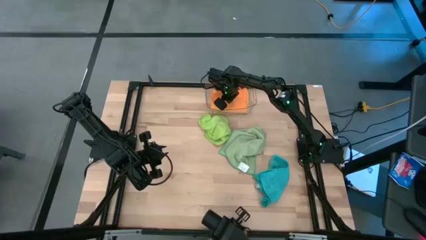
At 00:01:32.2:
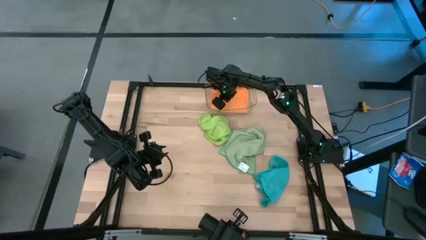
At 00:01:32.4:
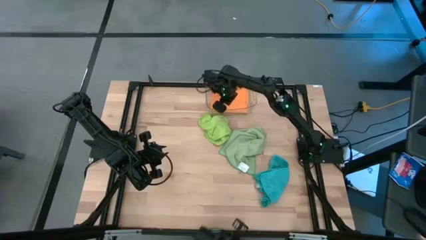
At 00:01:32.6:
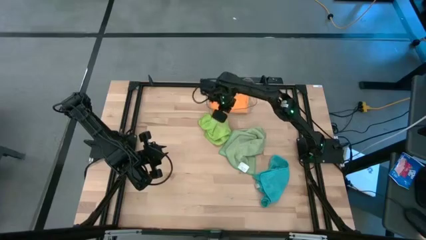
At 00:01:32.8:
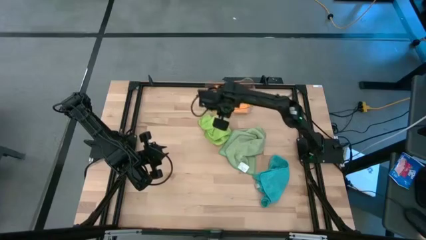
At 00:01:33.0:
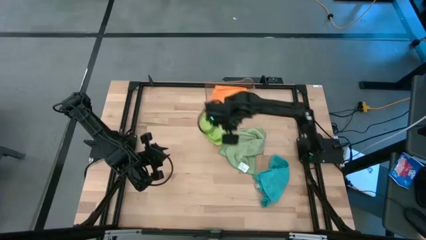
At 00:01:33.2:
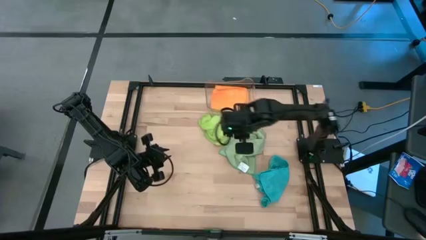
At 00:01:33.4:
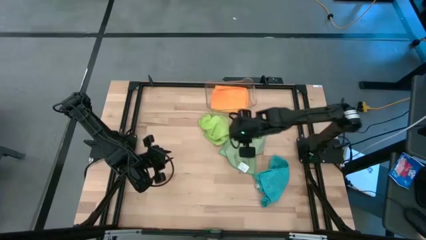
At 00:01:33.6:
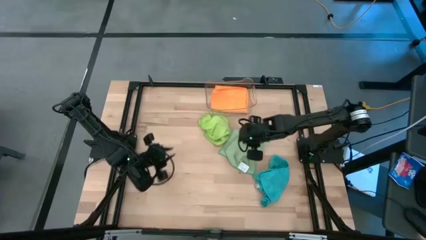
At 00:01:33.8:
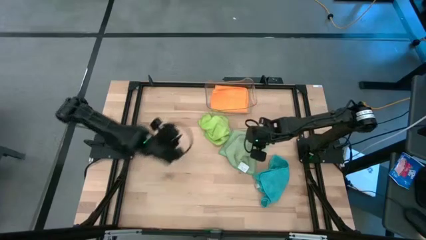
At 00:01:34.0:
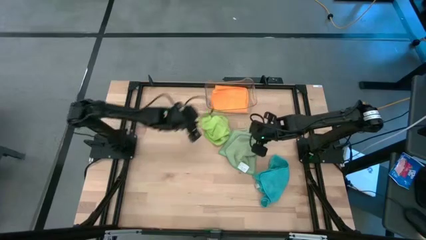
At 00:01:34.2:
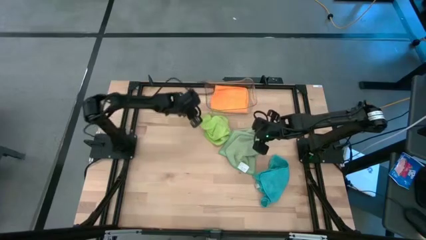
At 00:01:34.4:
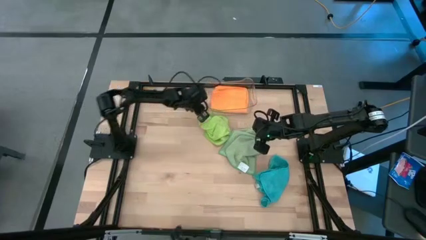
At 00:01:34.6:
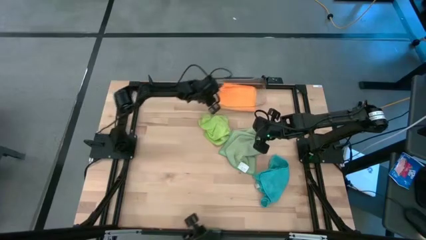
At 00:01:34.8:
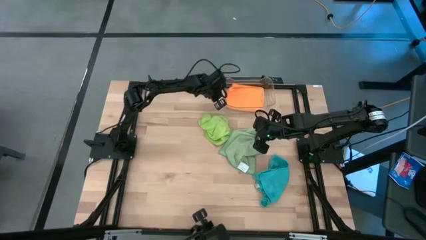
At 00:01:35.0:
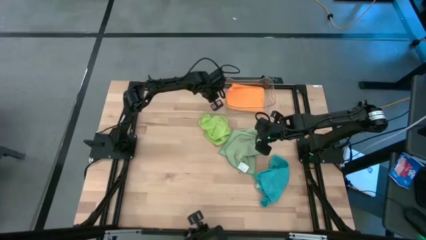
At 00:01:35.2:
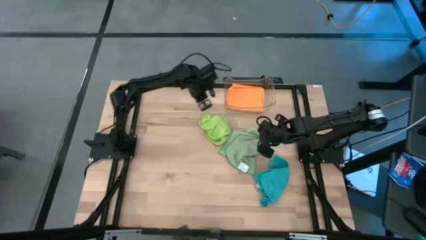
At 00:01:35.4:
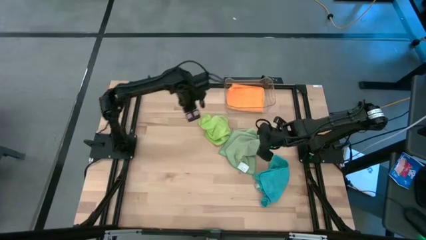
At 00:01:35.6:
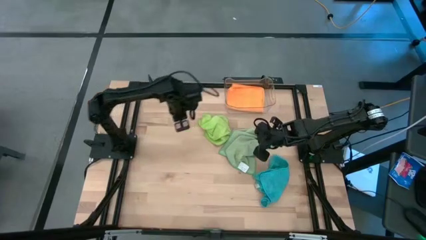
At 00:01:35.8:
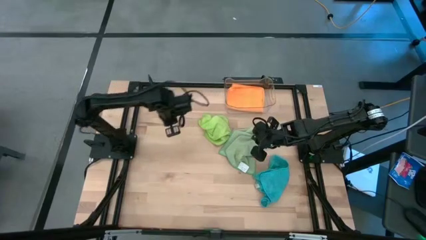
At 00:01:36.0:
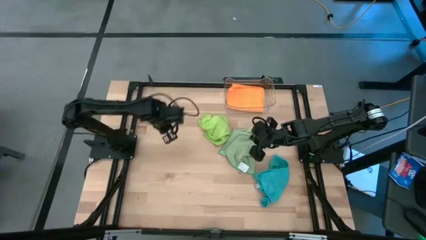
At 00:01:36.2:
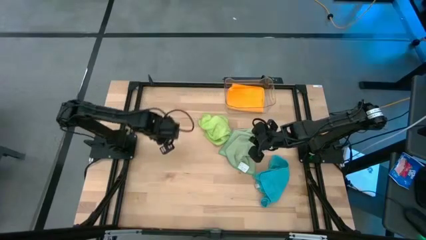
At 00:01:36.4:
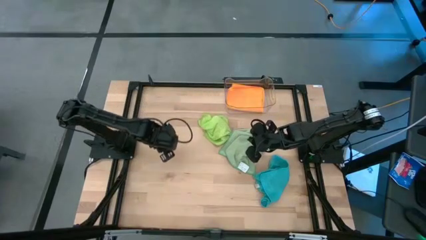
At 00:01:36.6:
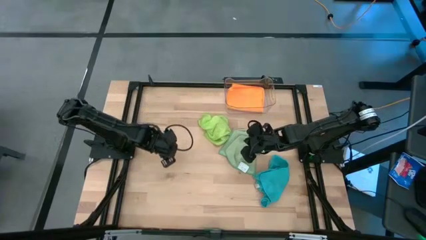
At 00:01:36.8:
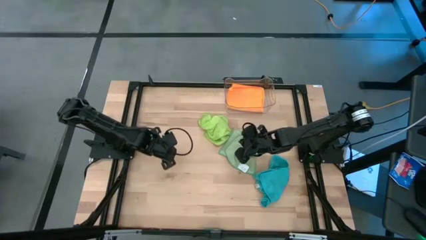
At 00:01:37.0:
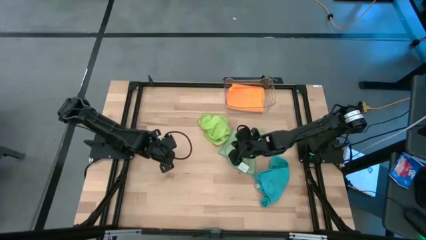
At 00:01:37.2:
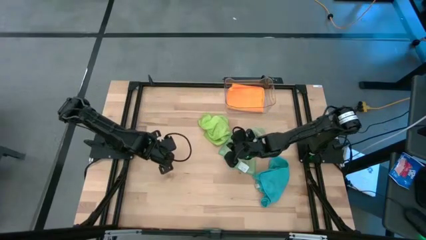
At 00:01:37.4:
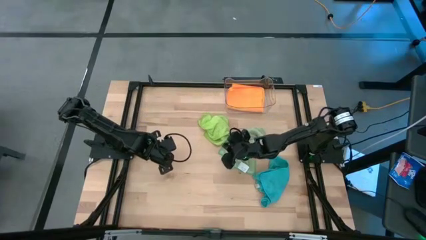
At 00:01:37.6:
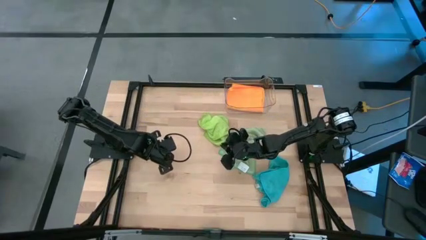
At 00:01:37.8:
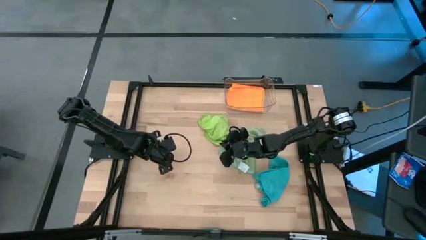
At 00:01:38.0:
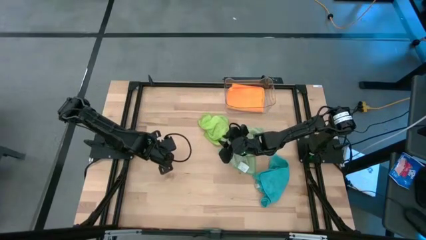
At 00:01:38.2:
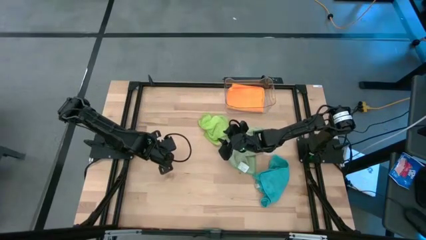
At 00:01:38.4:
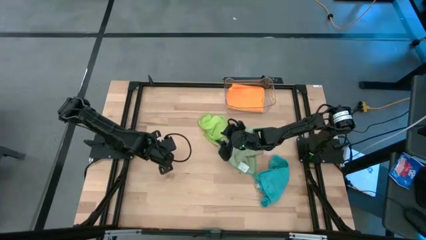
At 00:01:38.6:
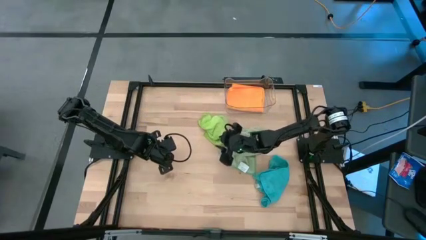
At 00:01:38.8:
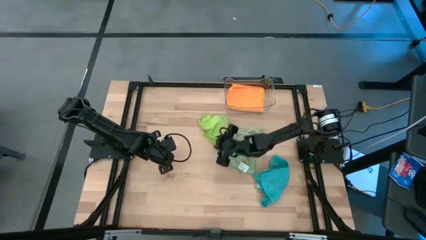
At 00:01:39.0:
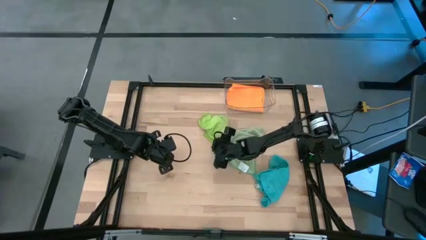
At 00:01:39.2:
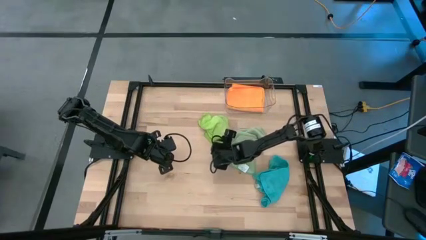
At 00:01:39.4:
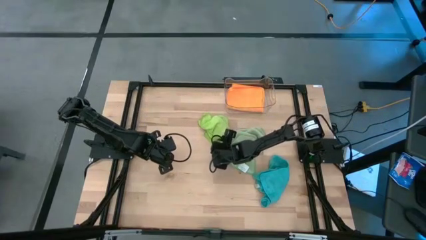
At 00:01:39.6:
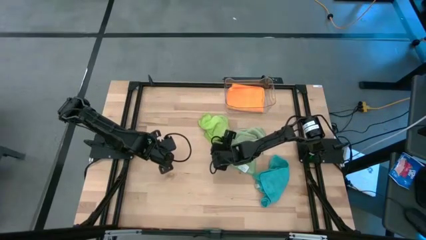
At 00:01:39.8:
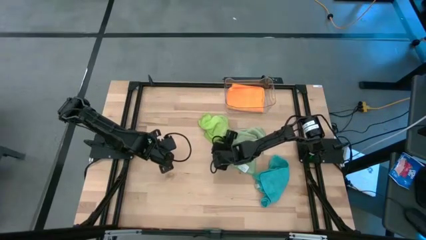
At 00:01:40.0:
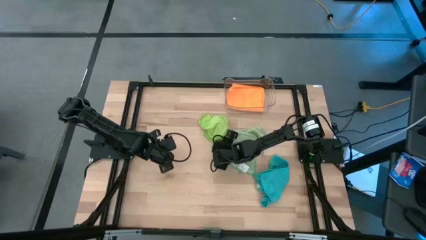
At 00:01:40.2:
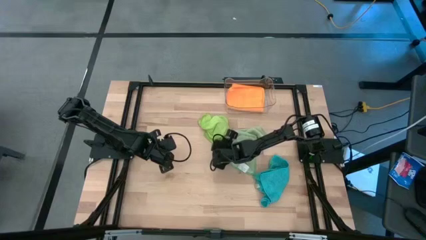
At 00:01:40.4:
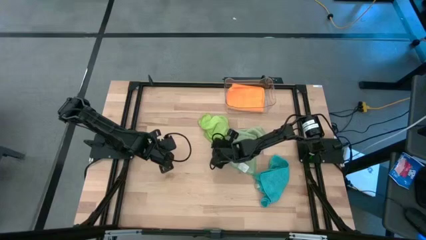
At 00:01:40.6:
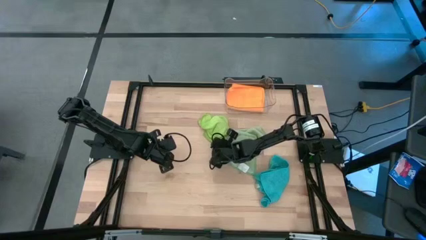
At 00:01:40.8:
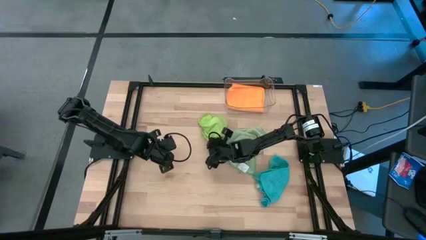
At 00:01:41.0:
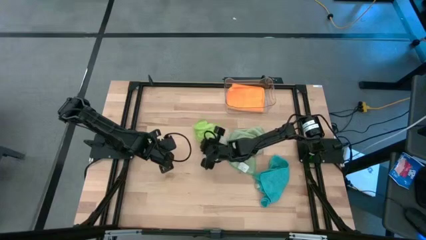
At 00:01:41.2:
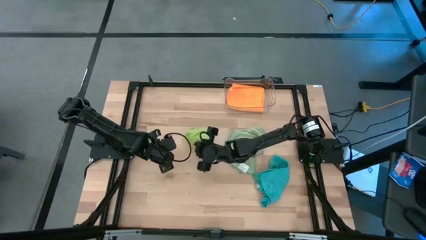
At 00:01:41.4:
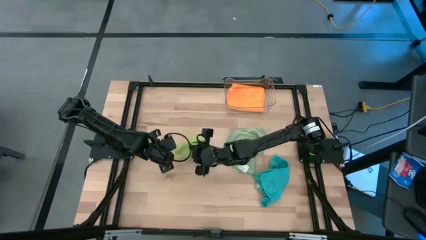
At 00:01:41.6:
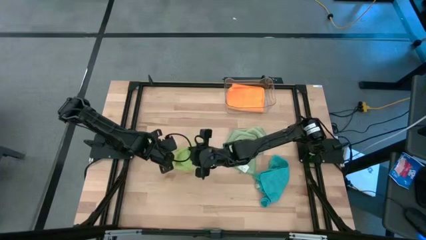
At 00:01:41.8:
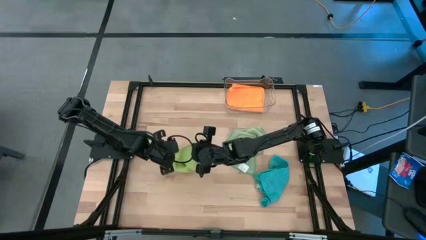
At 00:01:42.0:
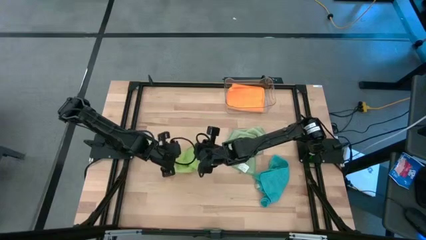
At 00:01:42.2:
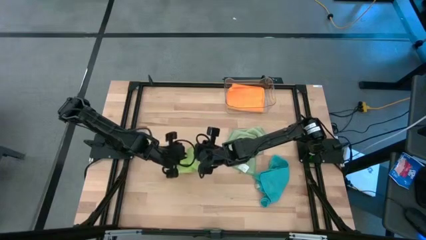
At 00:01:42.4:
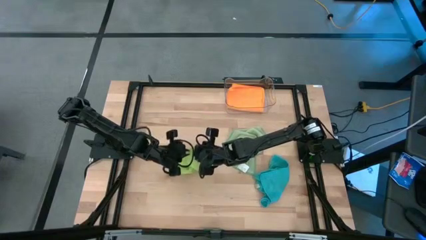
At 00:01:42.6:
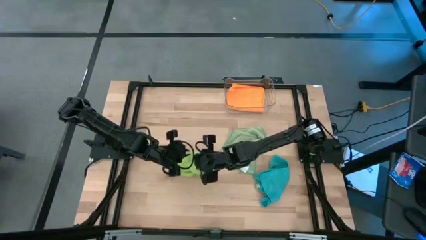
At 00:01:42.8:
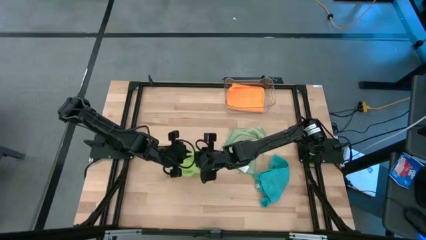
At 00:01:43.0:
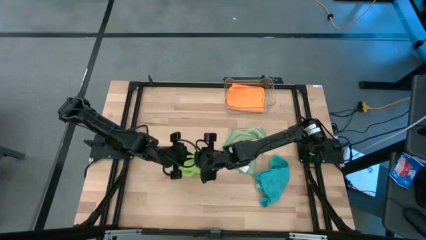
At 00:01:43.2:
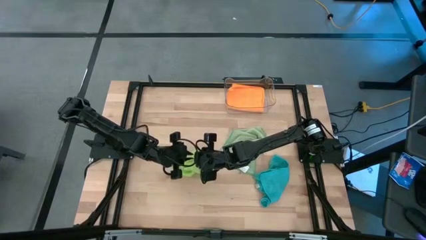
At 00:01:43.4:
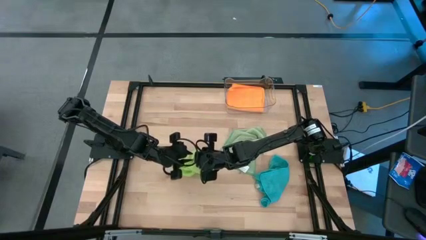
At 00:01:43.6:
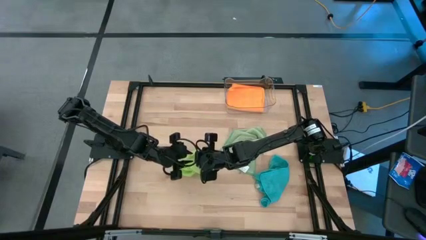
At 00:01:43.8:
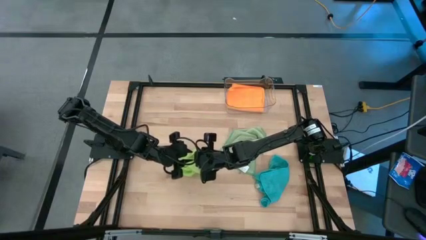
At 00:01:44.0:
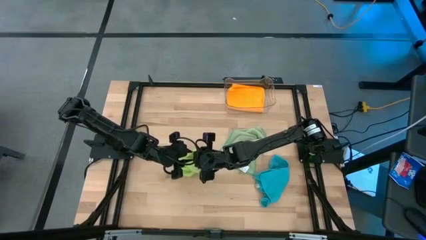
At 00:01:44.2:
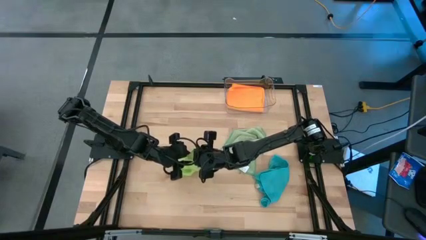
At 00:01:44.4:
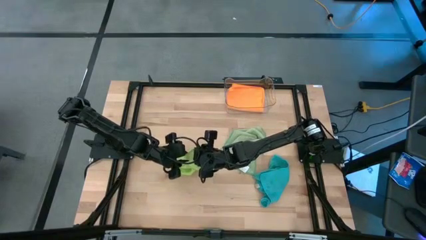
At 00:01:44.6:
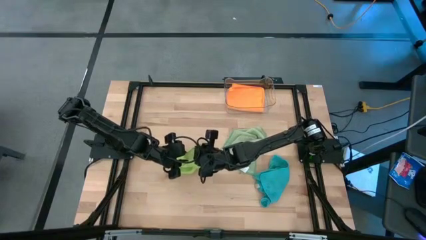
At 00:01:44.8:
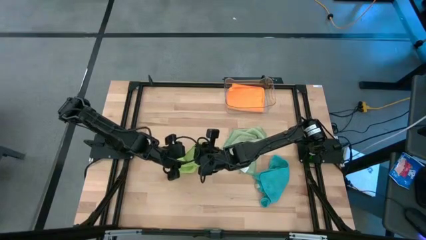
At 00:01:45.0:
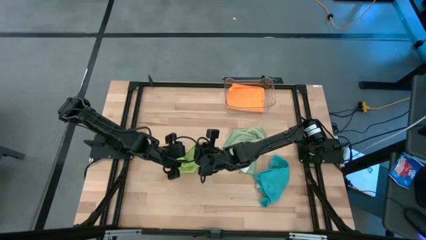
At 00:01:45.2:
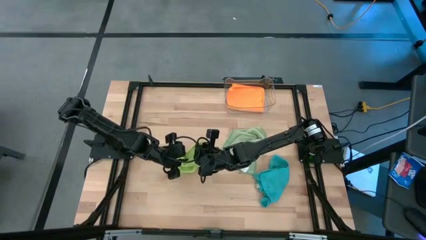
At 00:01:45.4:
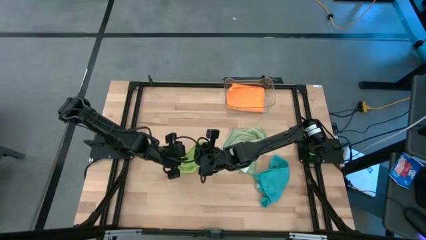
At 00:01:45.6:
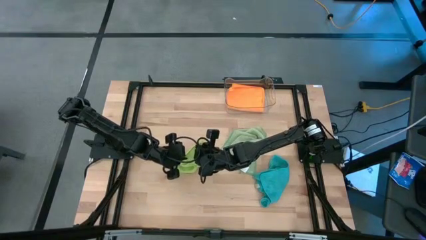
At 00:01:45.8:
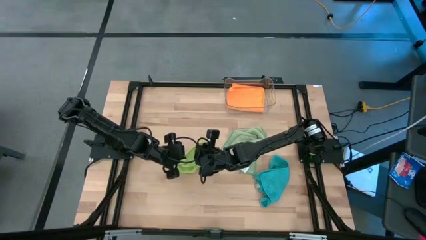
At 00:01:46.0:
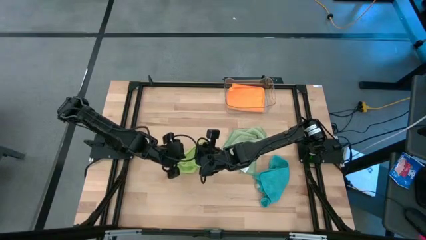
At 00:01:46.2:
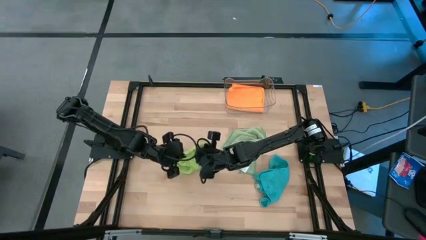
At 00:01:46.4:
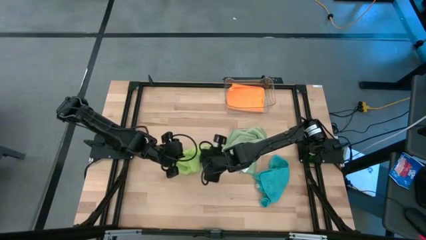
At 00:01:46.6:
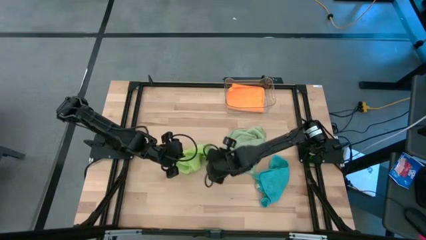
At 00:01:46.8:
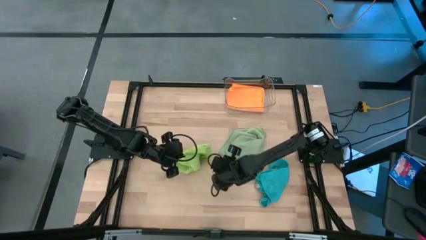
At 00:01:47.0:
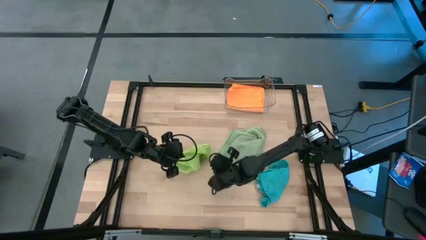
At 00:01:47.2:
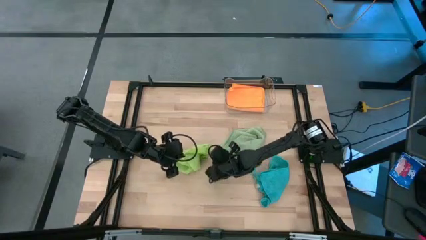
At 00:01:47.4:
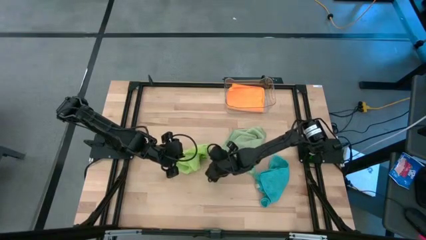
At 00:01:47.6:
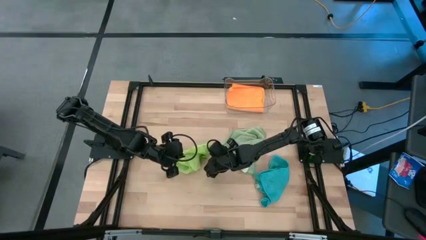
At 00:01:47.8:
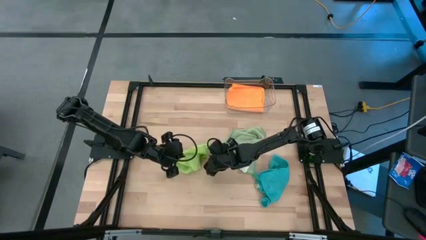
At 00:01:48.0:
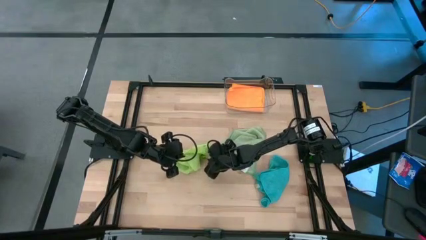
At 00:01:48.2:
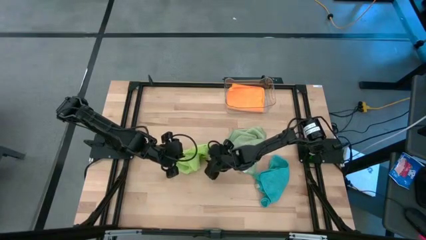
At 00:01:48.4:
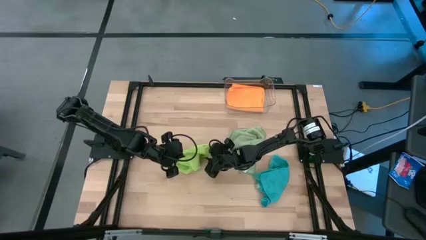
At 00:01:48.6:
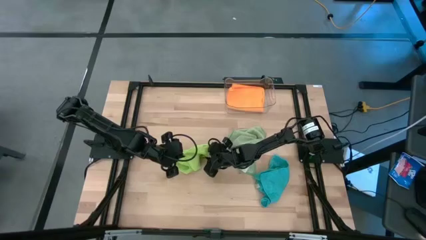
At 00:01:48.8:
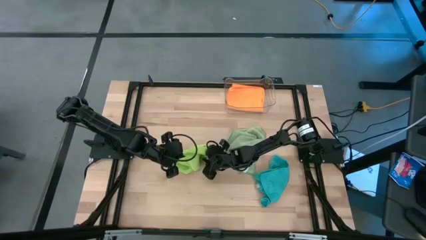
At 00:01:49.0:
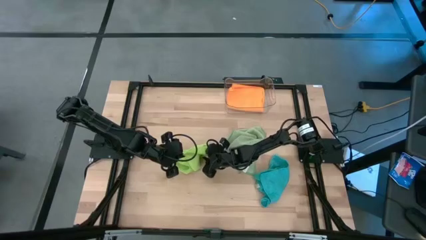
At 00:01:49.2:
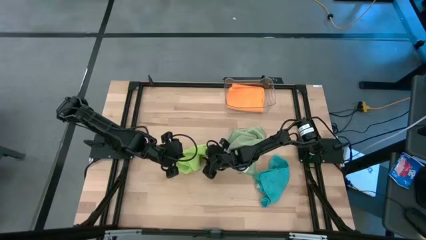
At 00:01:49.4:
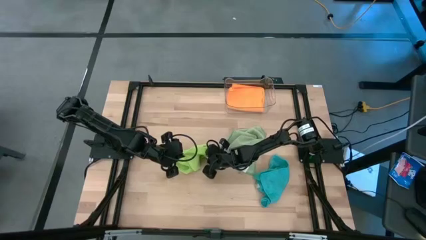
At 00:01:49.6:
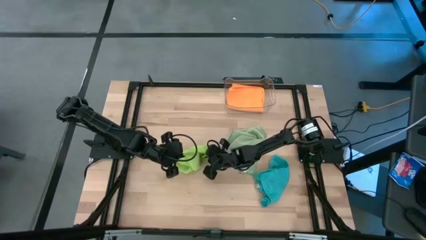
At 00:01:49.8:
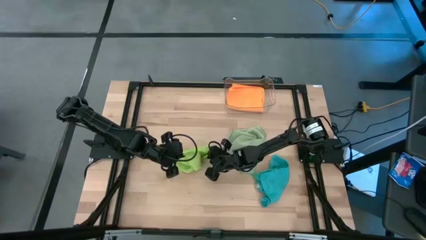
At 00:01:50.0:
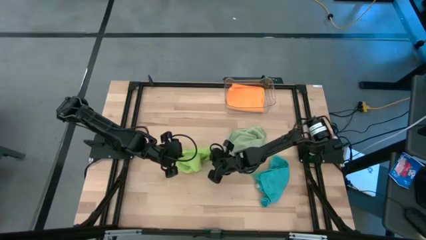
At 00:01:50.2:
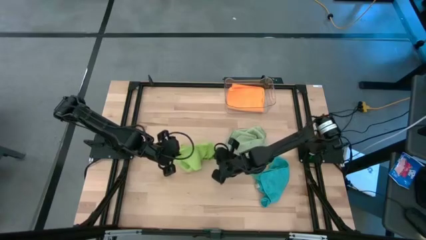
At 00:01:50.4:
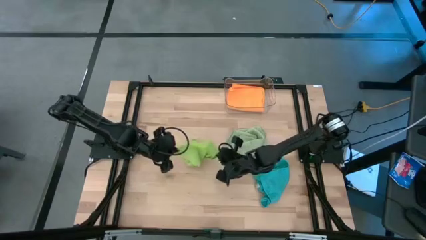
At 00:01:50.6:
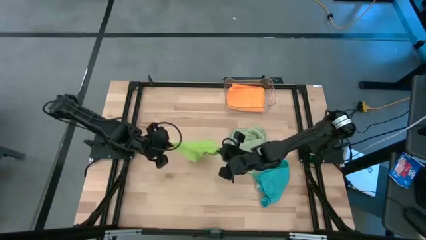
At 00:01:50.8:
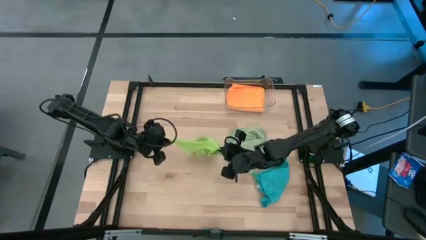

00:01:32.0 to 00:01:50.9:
Task: Fold microfiber towels
Fold the light green microfiber towel
